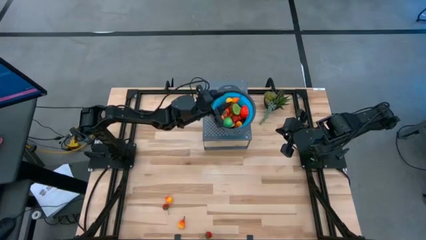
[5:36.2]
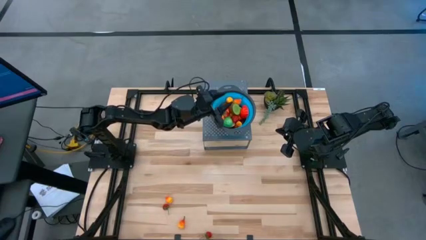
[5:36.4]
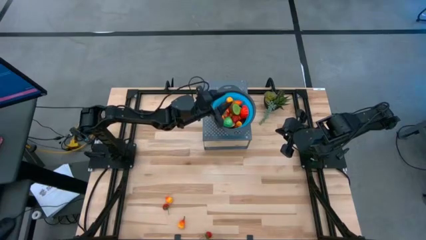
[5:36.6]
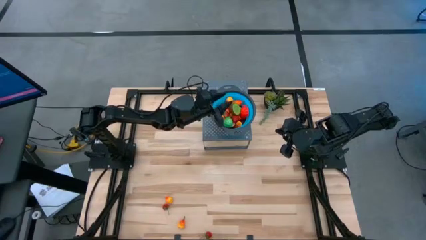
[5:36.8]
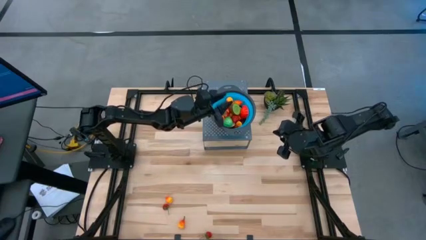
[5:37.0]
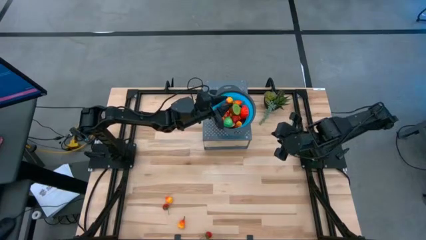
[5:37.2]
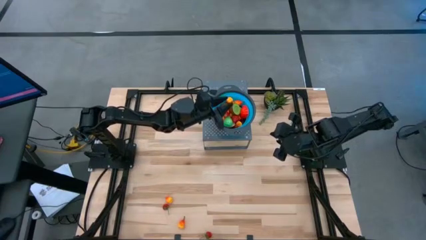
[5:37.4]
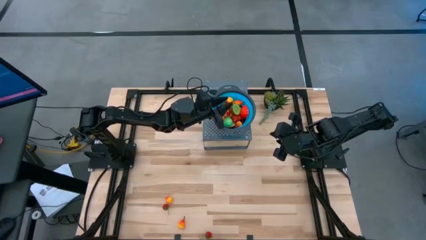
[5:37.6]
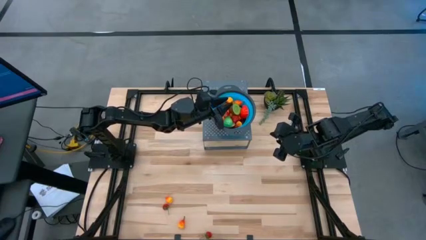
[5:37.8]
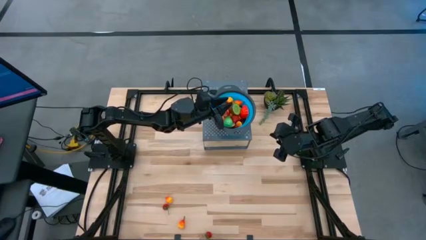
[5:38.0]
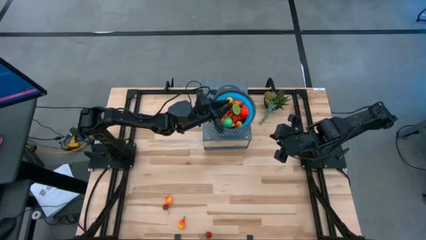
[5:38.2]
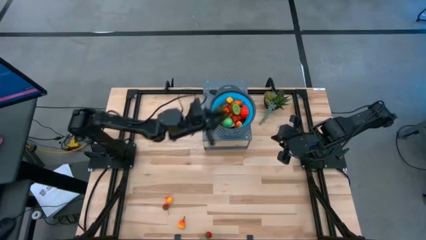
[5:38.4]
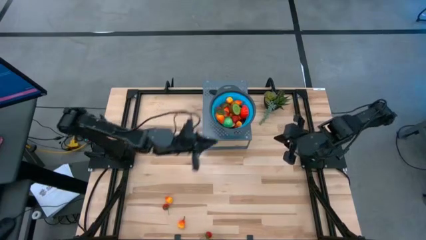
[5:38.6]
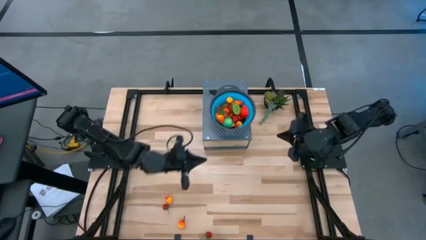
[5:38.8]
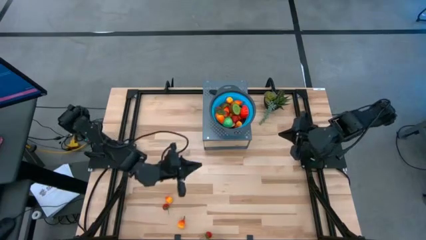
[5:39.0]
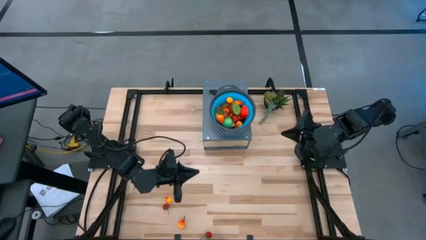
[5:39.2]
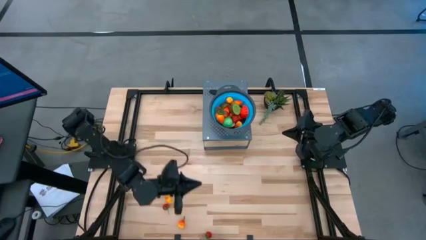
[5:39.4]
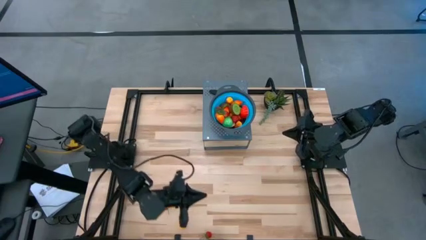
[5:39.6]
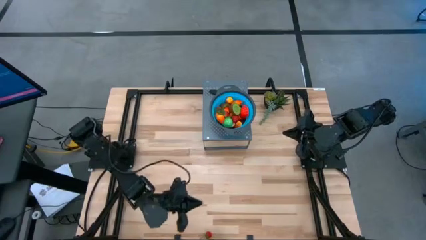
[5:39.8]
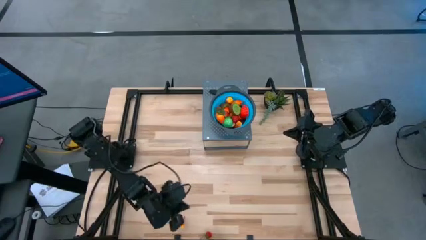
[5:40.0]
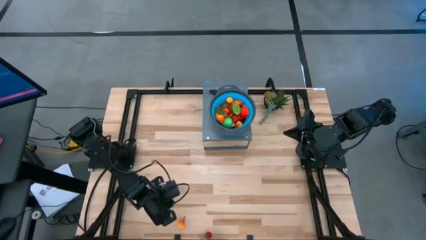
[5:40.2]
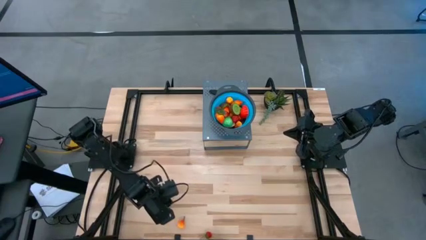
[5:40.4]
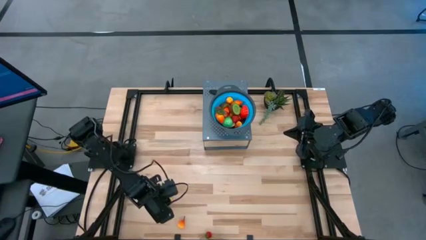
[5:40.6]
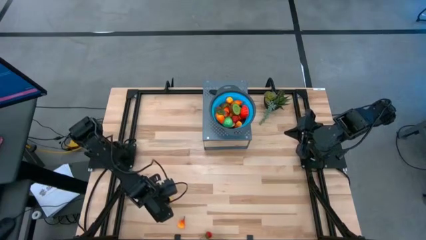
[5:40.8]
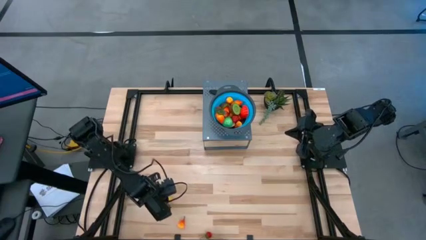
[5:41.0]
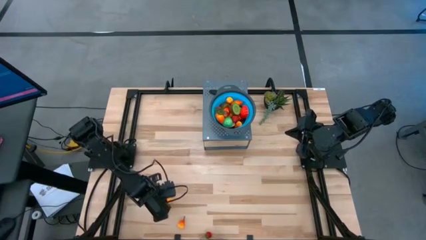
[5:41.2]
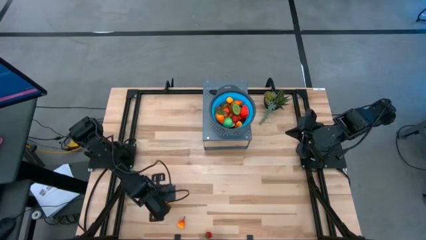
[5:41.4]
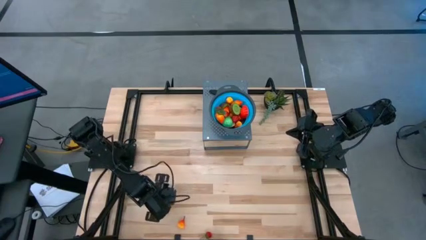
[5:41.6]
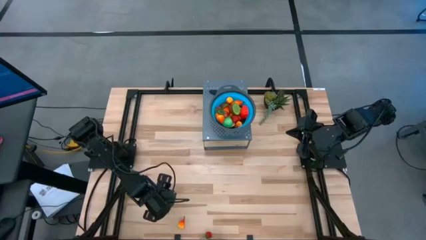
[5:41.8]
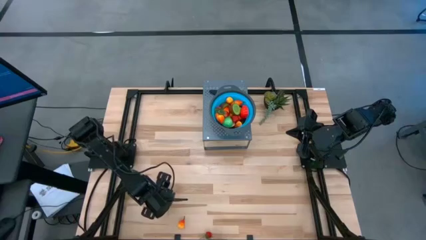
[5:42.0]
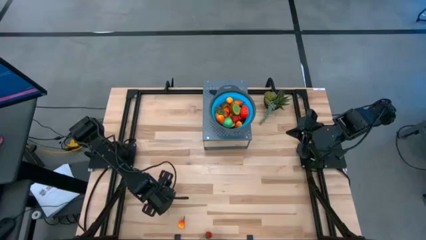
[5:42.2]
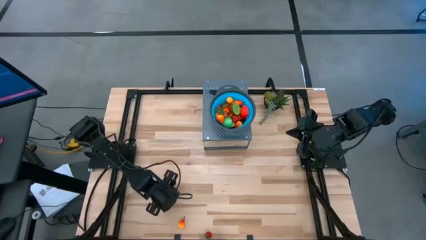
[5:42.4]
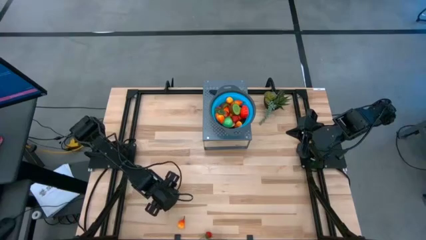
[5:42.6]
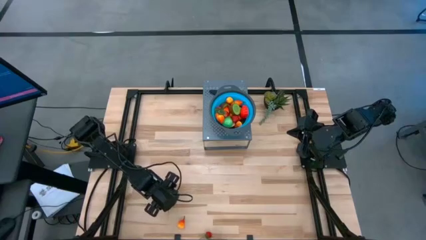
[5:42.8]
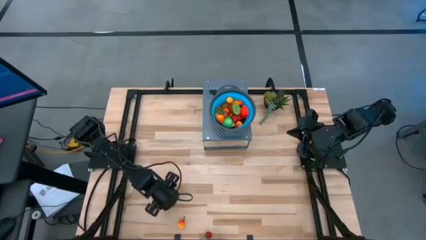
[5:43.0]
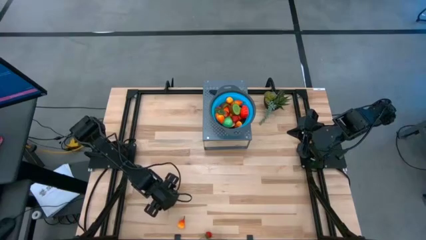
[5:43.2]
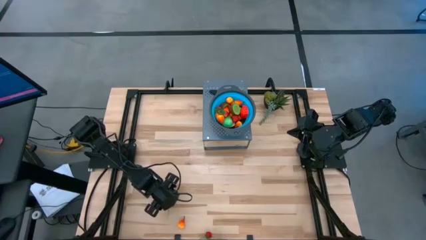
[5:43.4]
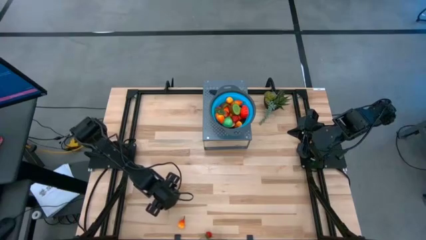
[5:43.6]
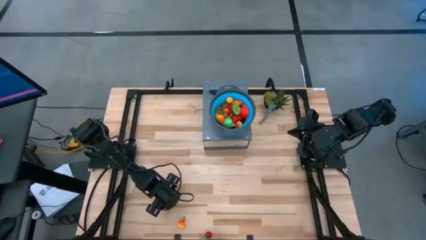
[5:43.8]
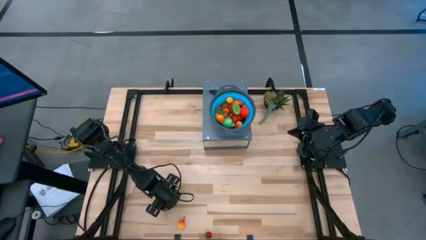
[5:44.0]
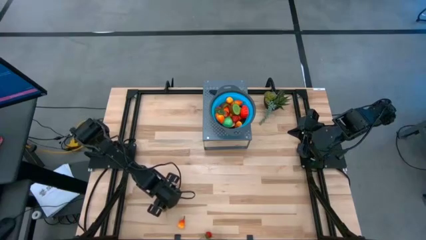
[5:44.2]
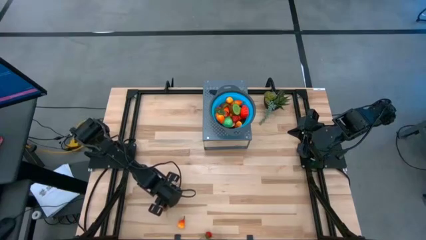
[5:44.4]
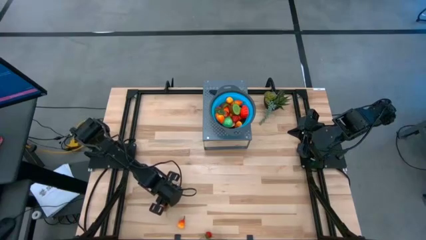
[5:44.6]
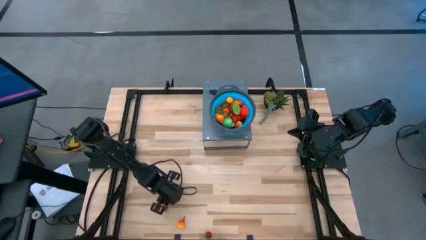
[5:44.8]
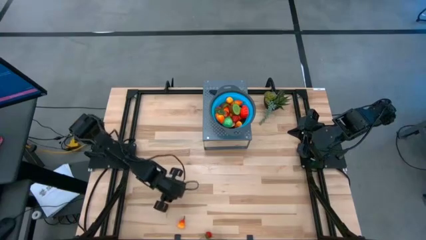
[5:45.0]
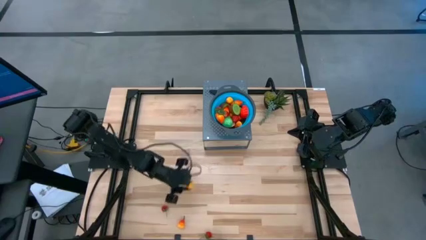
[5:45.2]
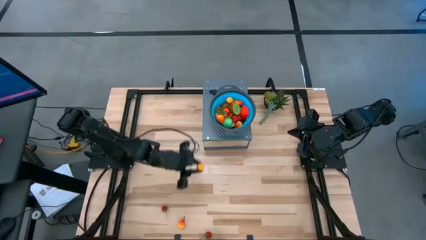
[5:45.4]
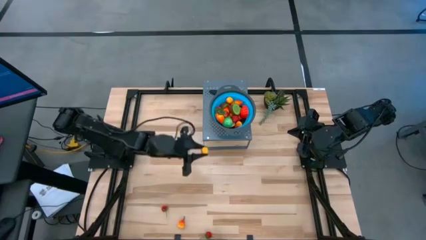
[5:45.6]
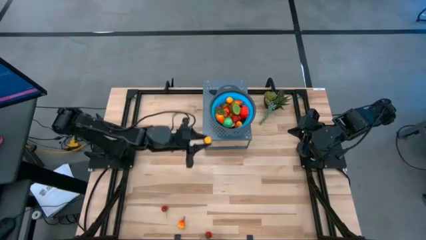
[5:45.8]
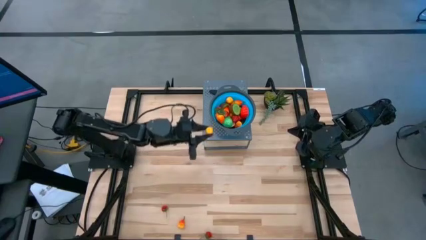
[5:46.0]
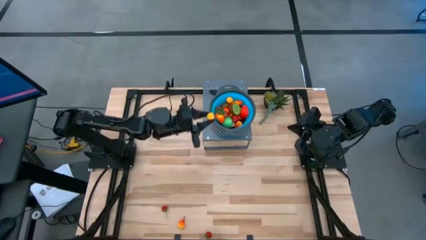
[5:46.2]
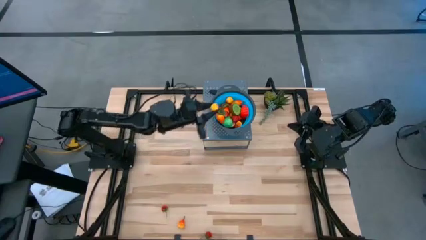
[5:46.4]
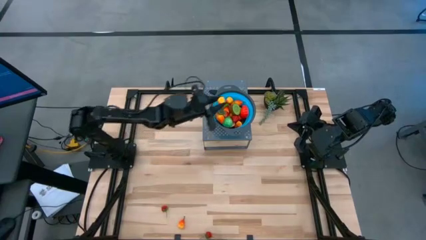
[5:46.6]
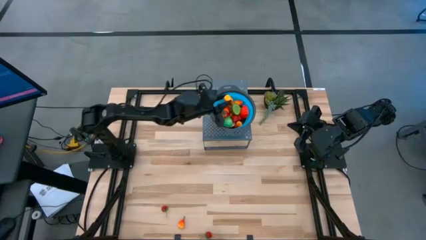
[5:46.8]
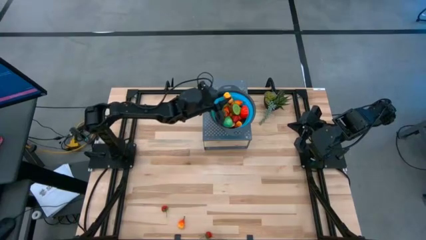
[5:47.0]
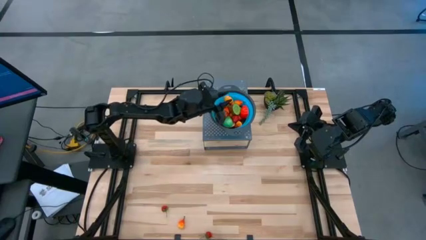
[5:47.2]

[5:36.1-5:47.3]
Task: Pick & Place Fruit
Put the top peach into the strainer bowl

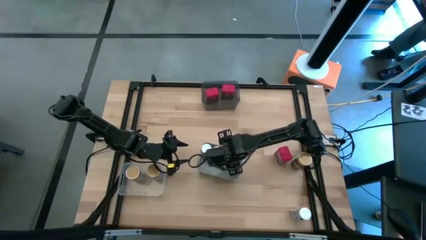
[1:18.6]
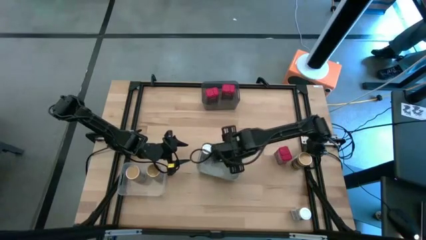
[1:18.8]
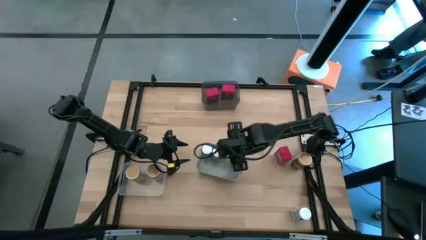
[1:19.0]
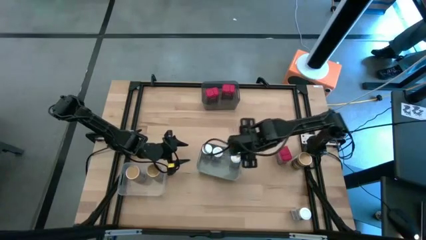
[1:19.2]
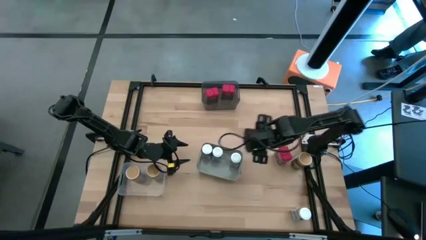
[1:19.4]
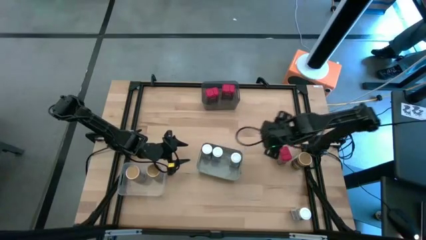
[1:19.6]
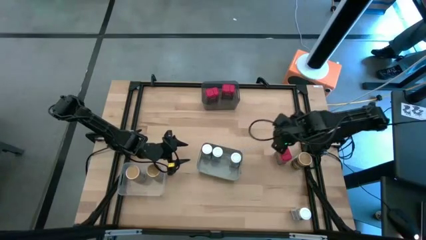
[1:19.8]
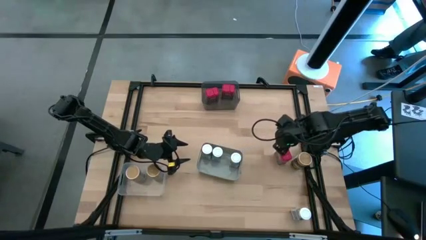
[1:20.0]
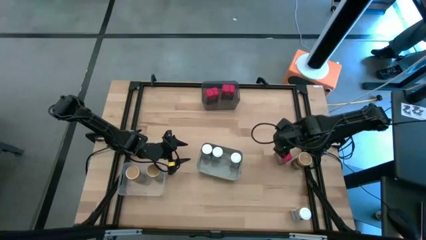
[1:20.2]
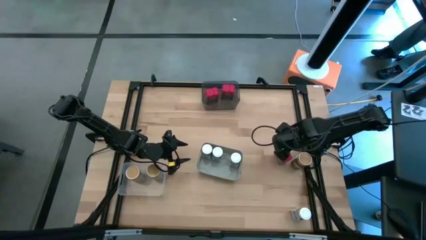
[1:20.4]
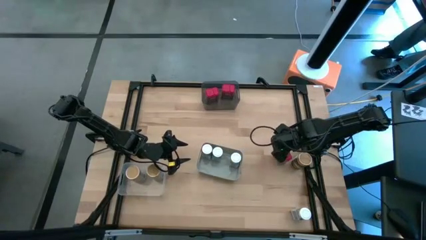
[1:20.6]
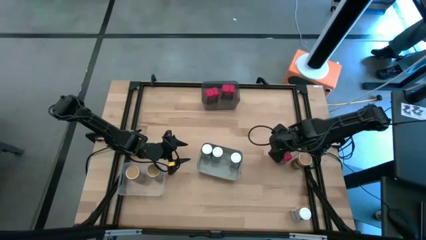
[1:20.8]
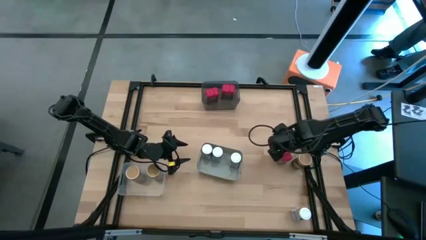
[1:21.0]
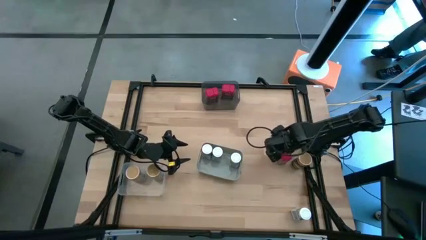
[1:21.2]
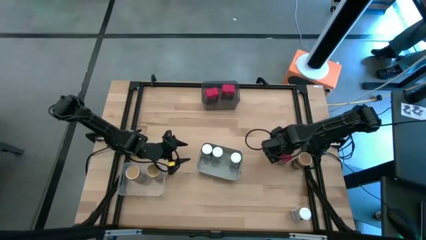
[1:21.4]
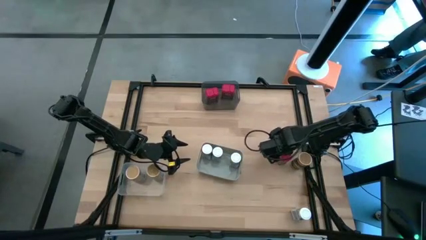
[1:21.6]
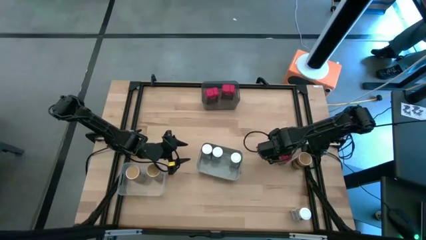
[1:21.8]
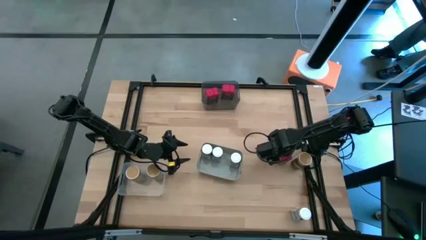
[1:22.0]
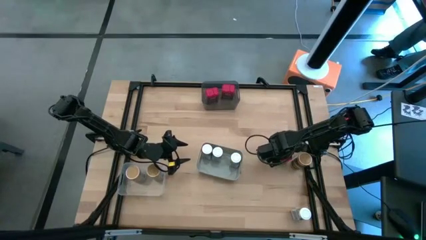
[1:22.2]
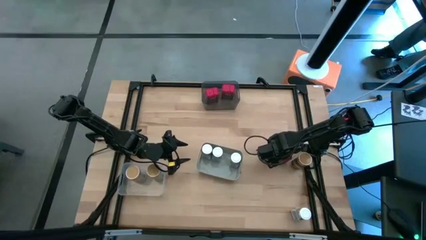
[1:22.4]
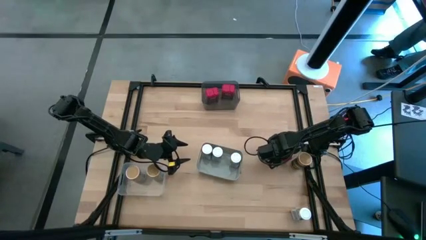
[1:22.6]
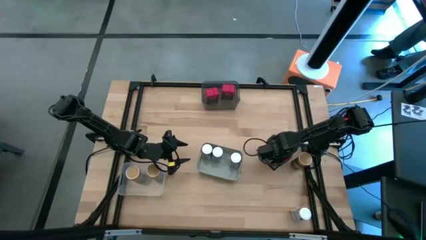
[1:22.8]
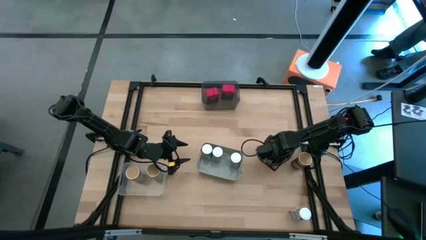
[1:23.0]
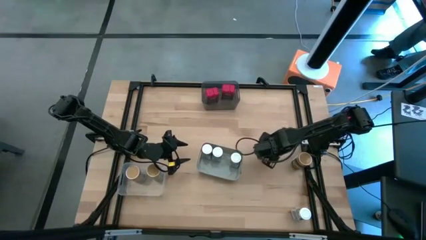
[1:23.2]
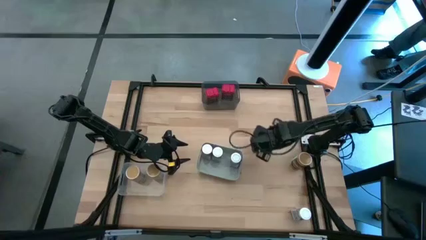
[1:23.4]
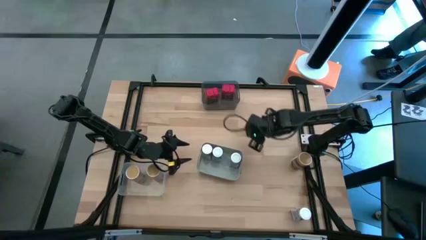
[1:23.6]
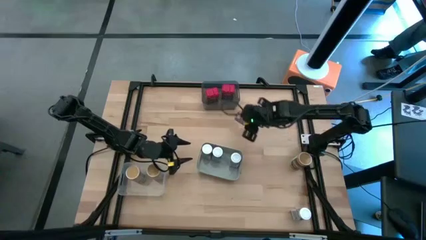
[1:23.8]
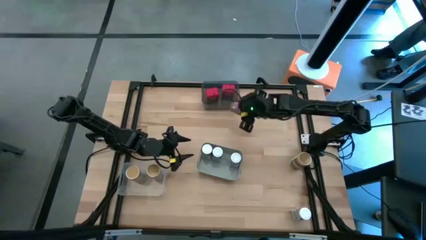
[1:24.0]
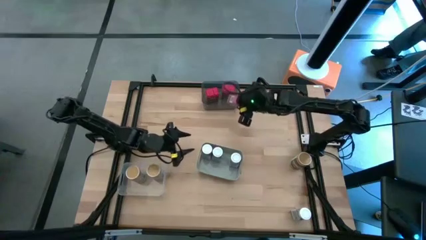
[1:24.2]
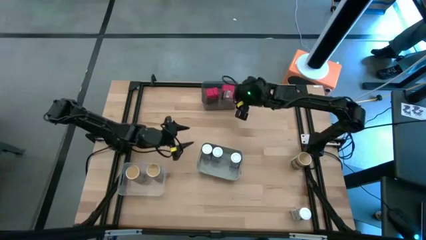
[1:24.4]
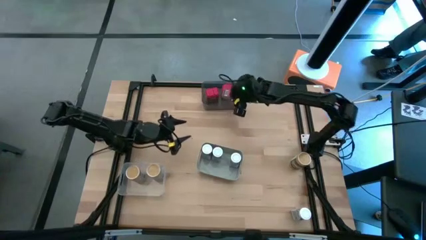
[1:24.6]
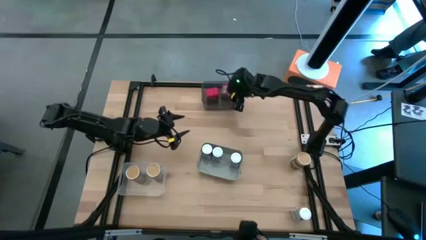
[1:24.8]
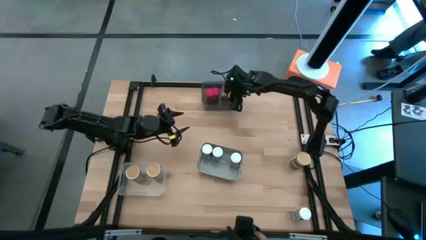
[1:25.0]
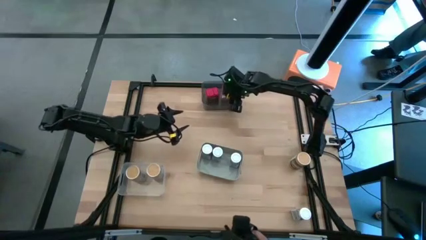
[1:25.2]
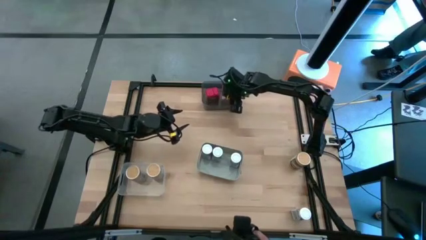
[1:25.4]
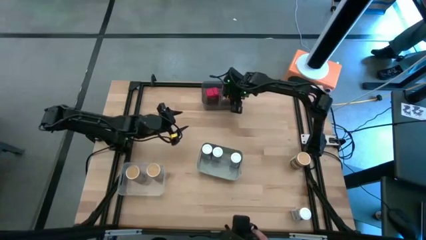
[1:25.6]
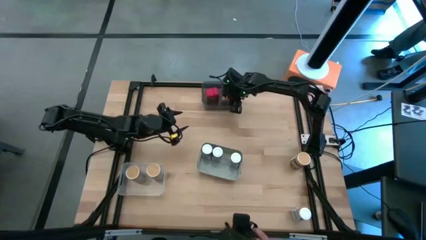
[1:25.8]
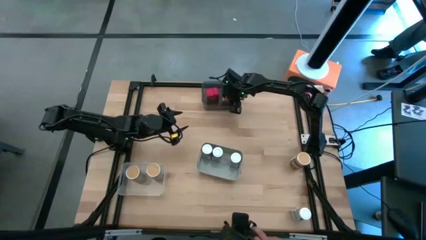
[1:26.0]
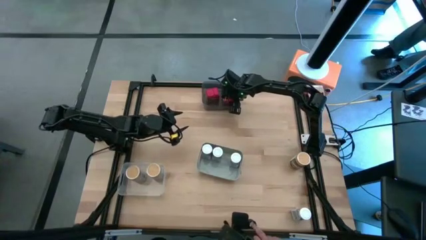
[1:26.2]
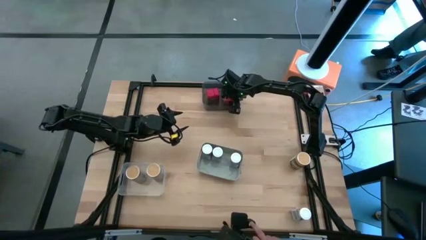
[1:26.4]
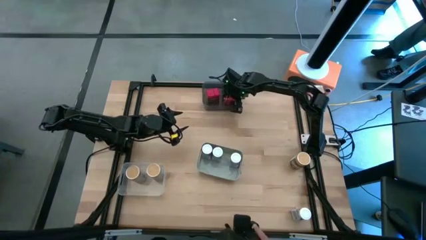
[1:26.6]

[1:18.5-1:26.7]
Task: Sort spices by type
Put the red seasoning can into the black bin
